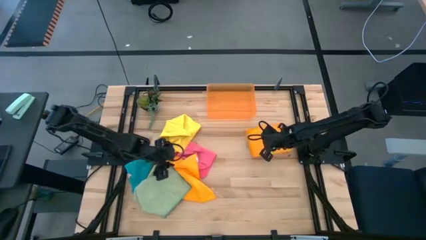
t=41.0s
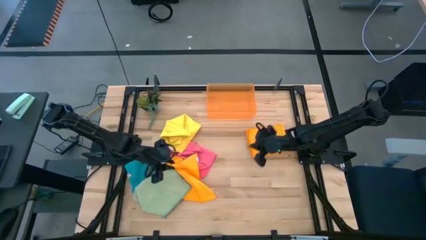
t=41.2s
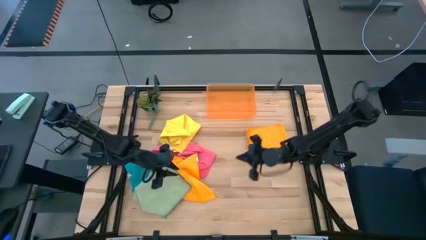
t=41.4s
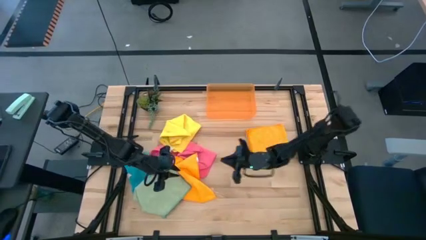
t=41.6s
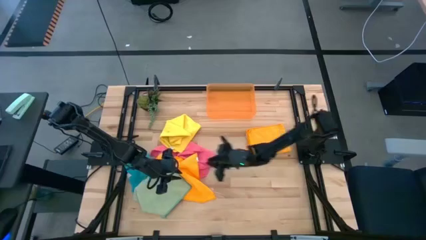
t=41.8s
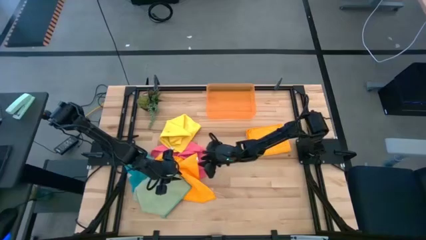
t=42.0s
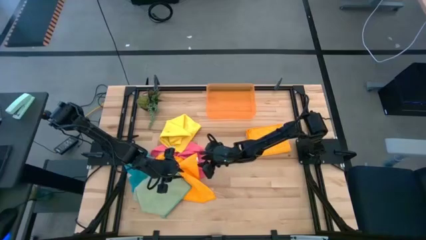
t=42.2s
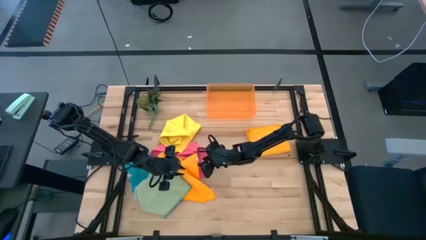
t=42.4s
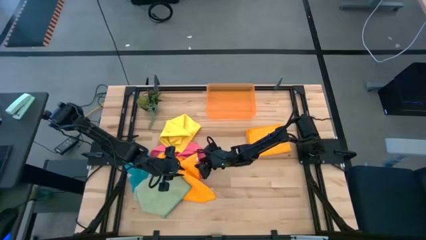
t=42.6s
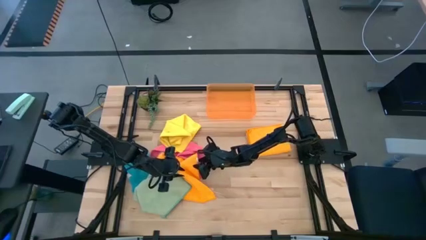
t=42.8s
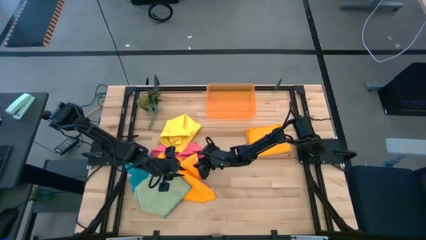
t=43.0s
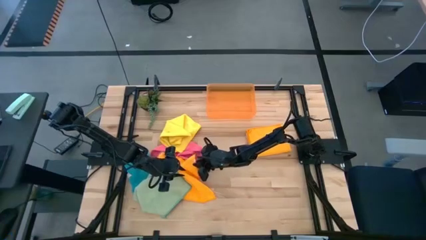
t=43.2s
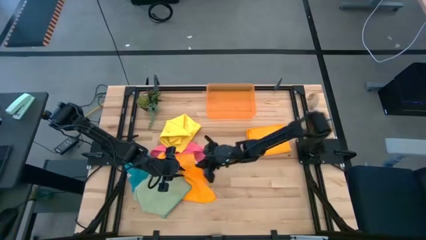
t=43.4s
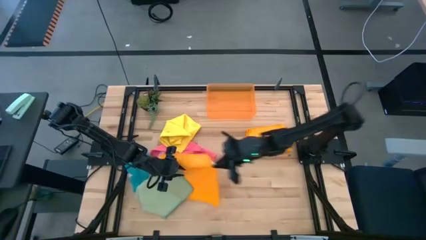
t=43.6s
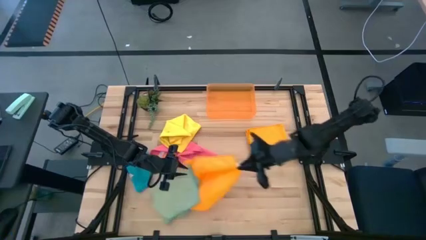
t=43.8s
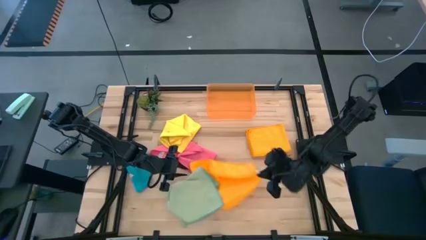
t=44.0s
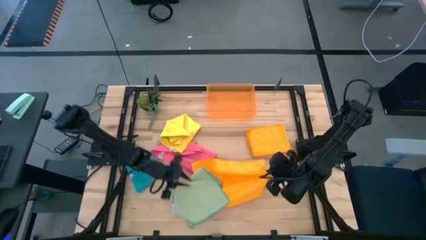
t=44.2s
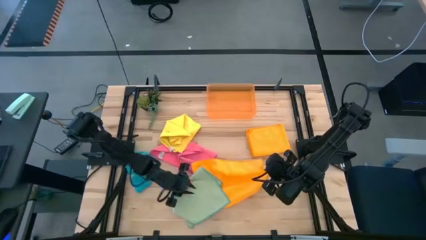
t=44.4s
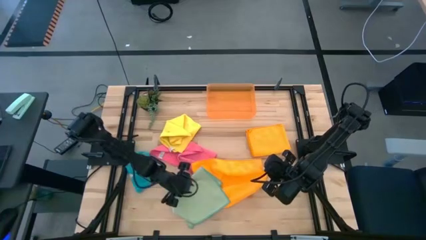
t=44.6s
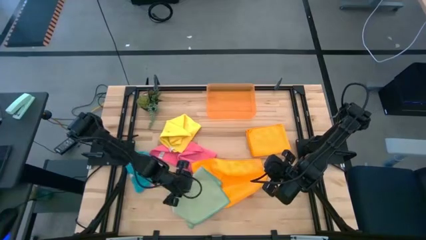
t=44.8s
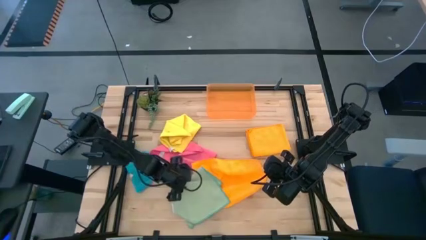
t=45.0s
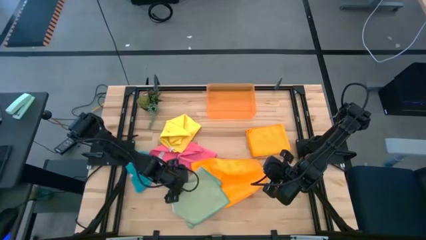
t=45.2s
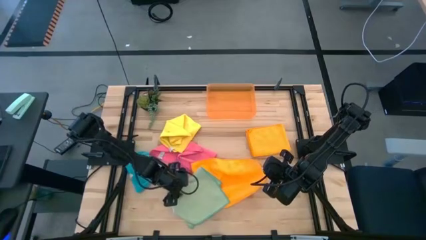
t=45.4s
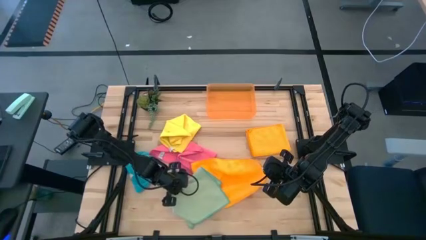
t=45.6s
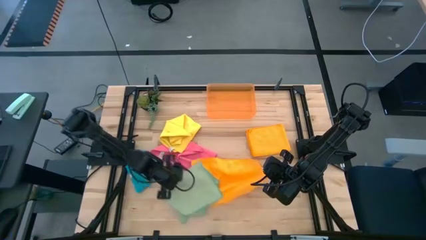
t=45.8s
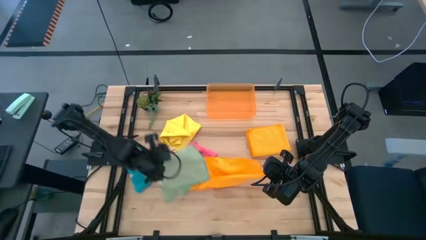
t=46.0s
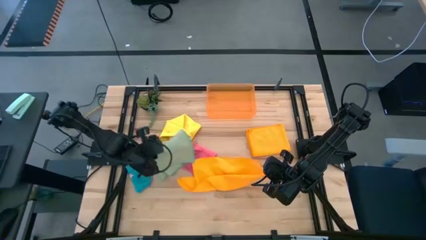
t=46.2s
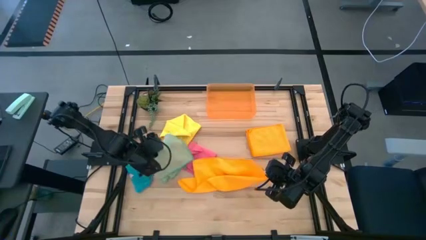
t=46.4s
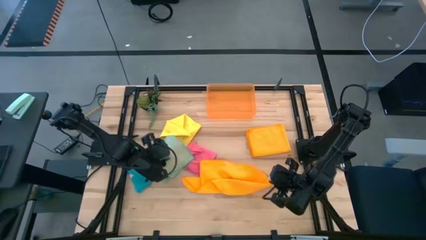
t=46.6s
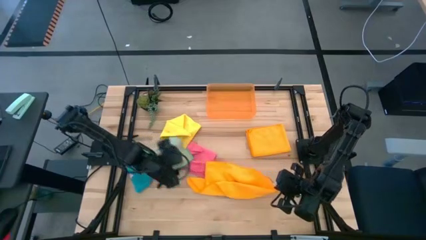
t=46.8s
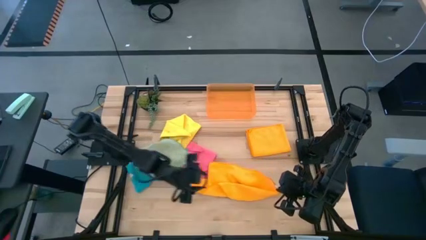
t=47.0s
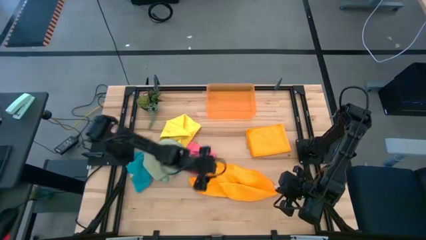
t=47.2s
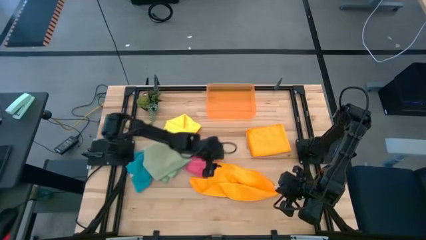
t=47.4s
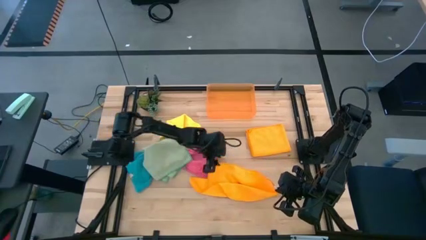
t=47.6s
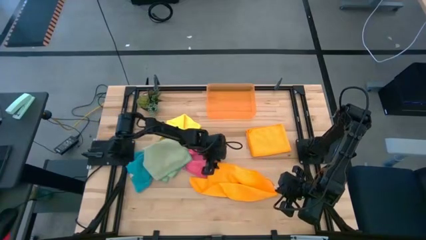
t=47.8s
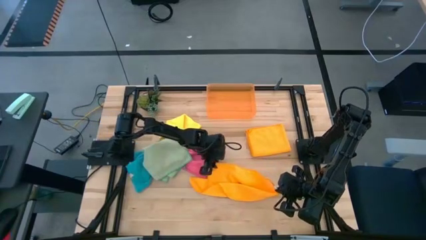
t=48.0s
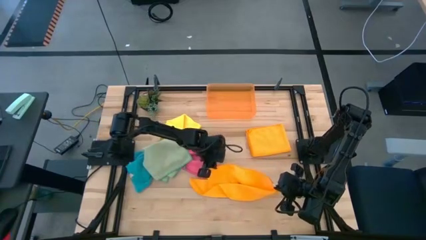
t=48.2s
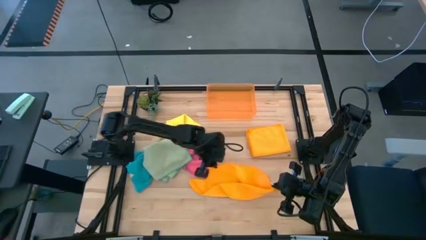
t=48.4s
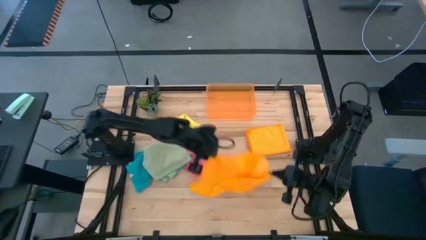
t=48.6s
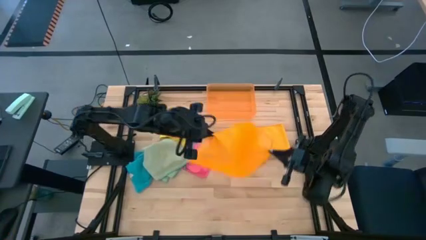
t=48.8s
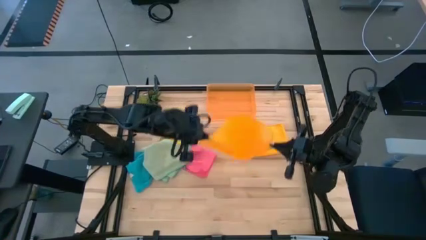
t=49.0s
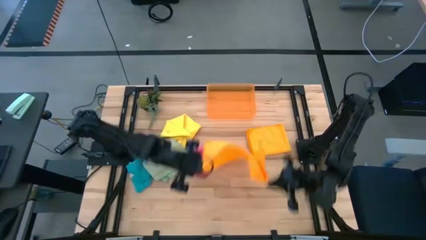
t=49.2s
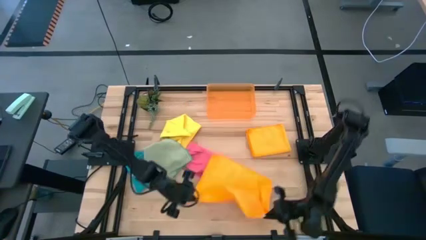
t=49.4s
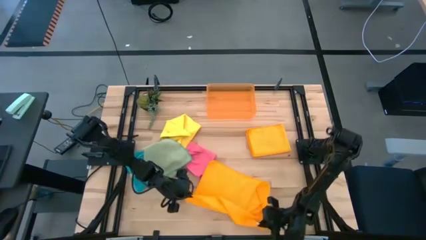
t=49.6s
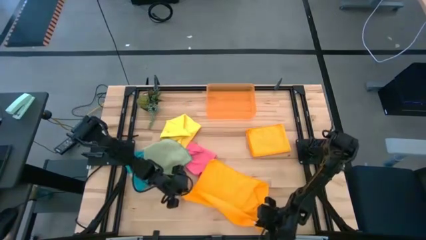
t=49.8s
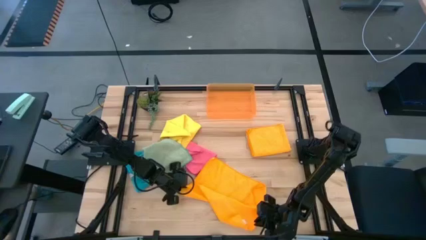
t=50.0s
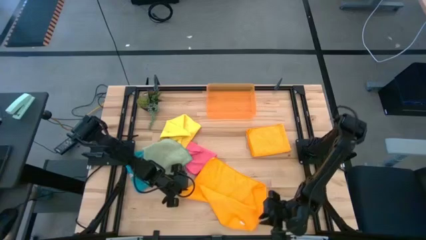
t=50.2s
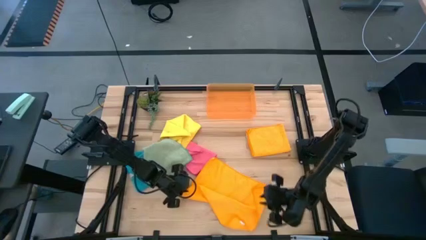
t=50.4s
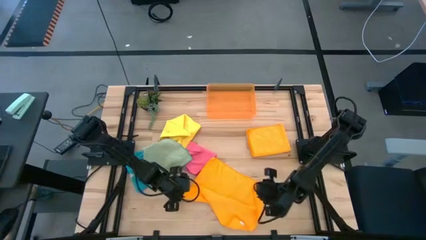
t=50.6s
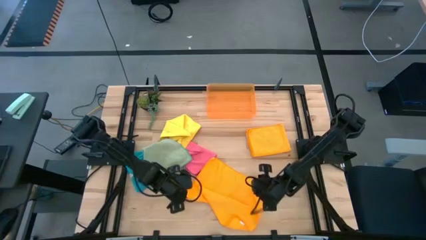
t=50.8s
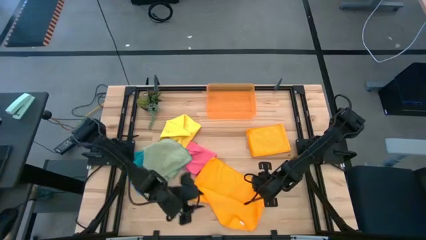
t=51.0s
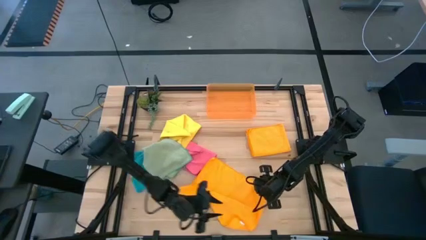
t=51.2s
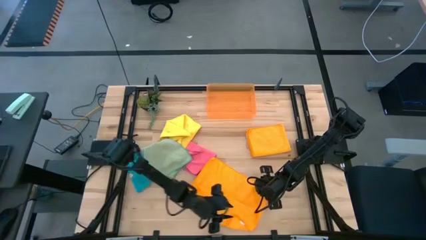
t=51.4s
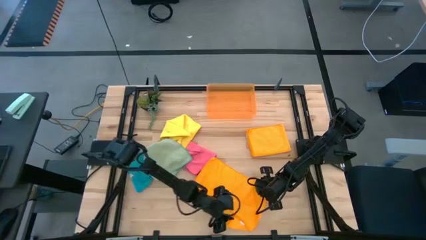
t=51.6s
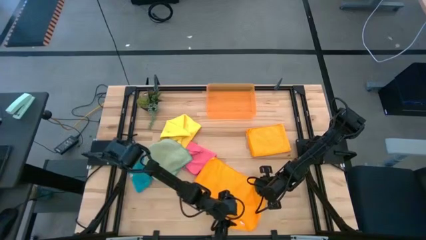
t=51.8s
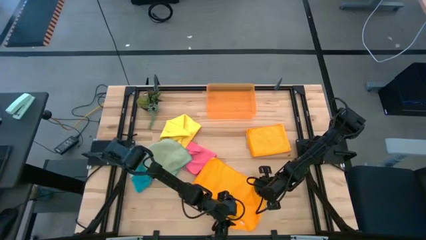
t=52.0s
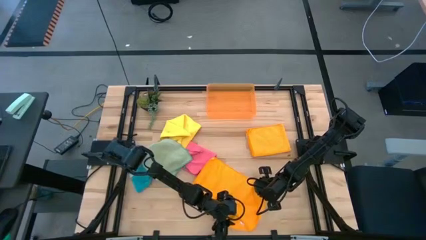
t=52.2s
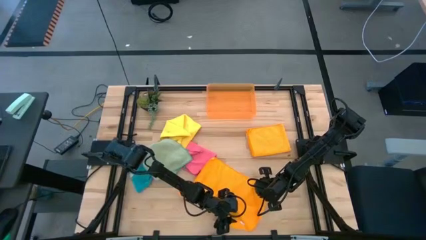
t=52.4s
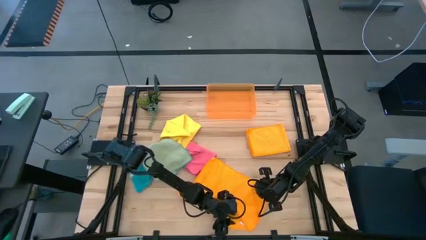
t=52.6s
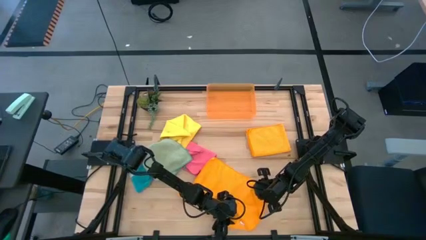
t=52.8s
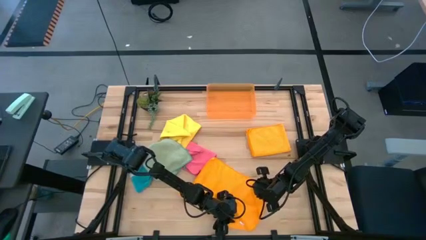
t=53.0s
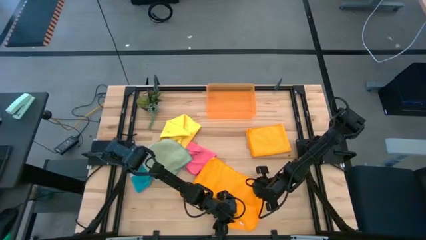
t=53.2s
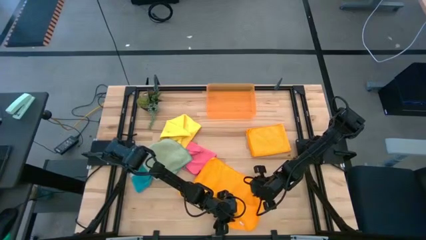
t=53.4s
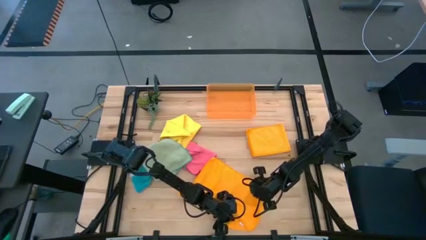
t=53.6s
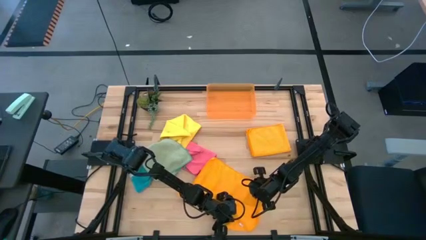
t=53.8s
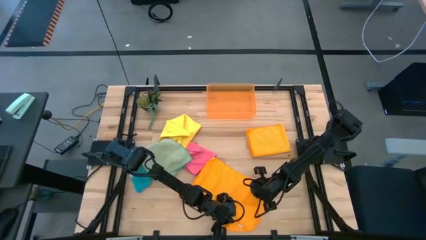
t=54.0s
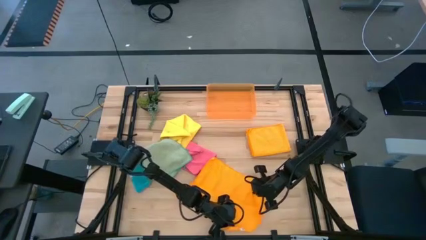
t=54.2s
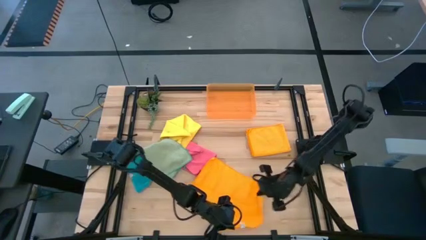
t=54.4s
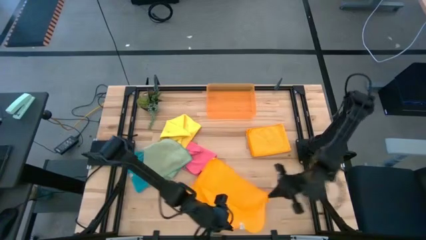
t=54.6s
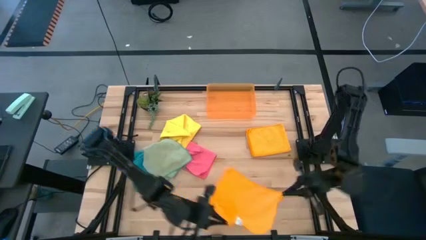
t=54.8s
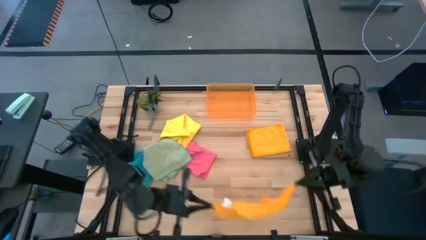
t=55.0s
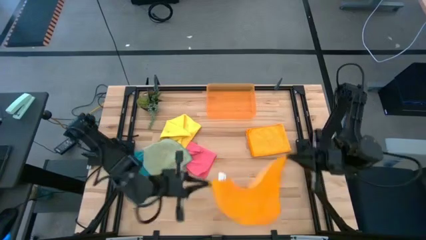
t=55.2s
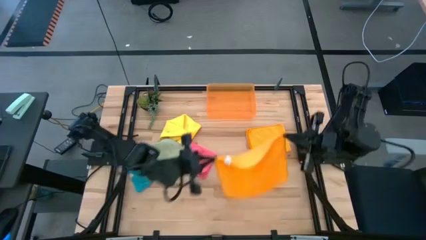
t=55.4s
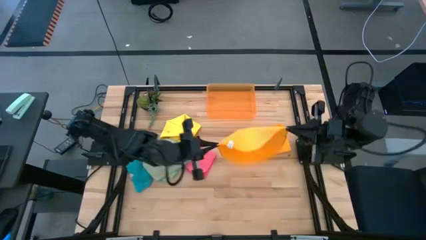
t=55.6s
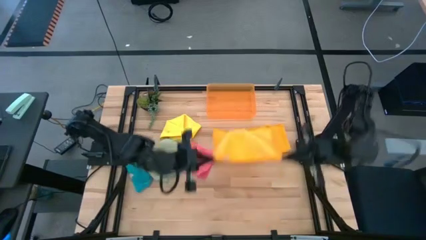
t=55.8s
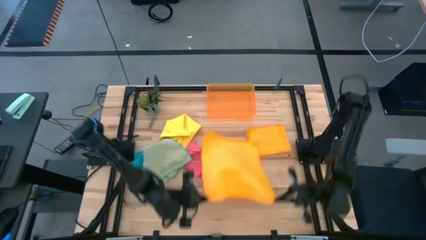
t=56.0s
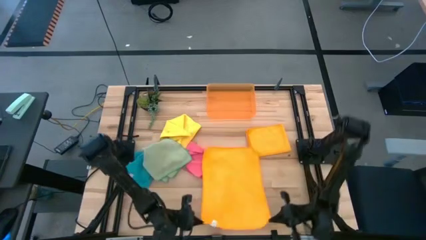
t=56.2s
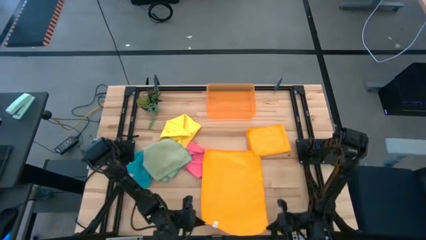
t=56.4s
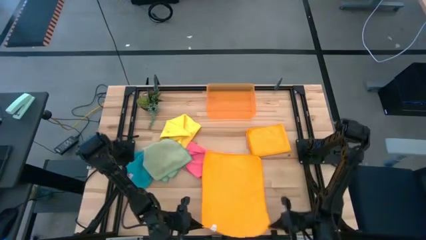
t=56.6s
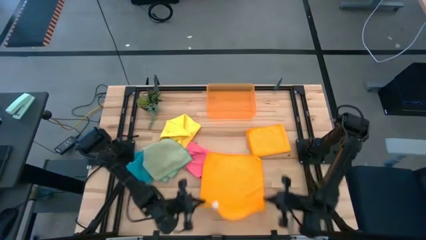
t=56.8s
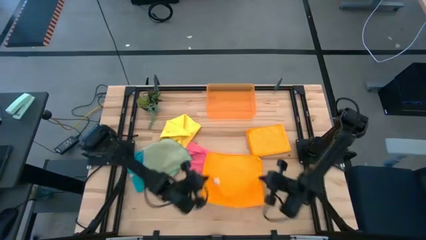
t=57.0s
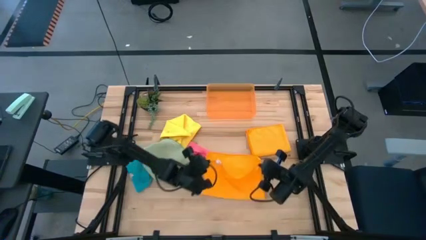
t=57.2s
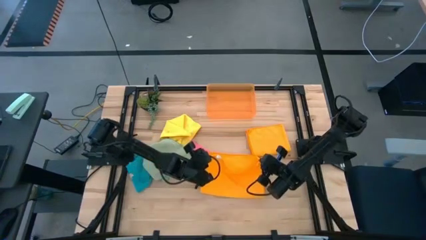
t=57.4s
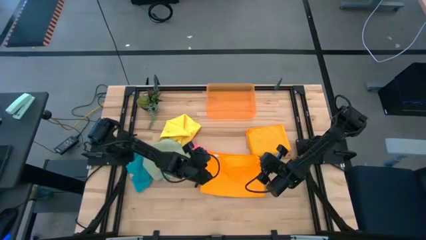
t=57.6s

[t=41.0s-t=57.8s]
Task: Fold microfiber towels
Fold the left orange microfiber cloth
